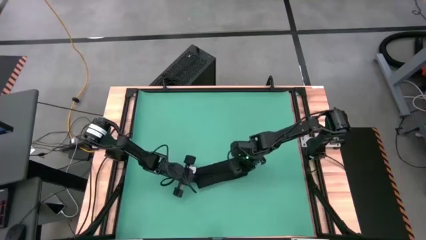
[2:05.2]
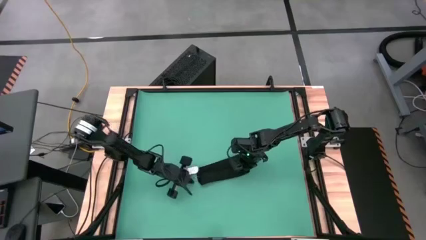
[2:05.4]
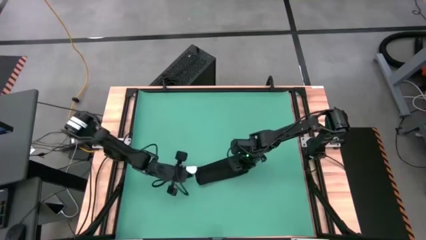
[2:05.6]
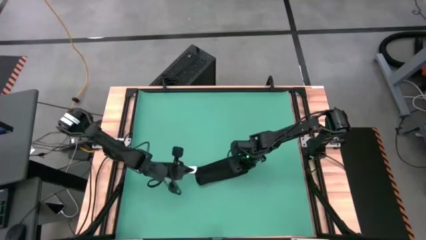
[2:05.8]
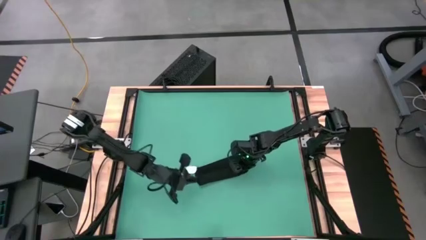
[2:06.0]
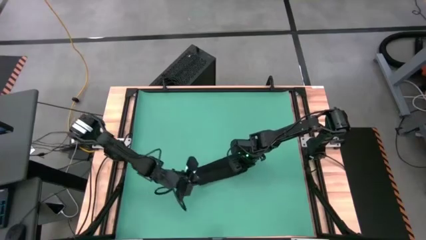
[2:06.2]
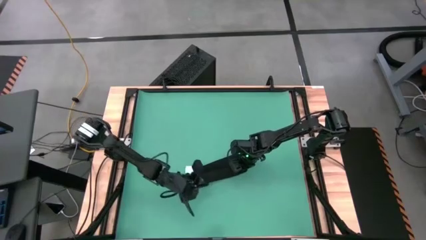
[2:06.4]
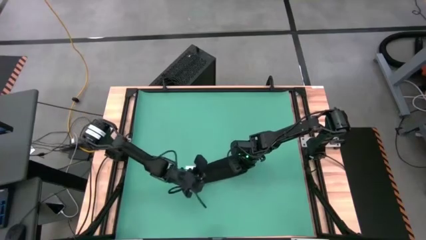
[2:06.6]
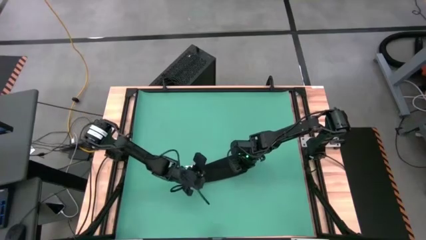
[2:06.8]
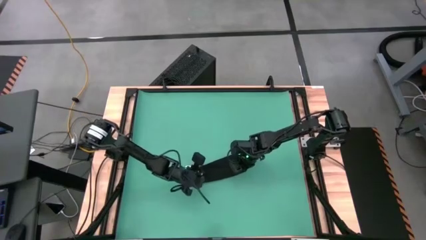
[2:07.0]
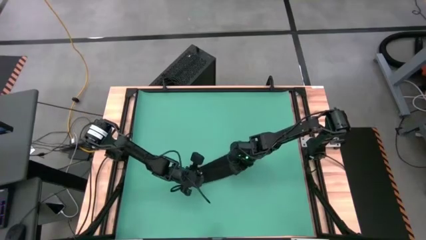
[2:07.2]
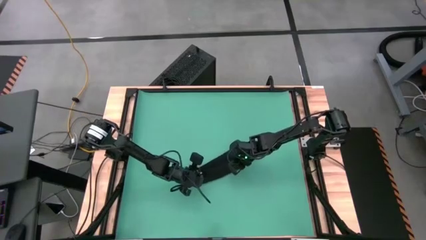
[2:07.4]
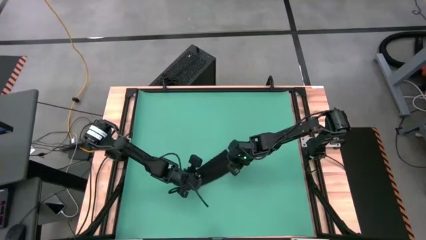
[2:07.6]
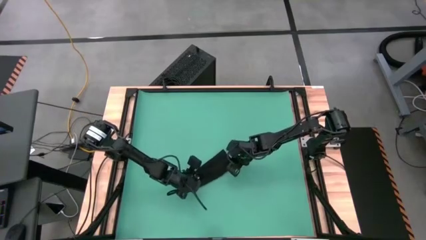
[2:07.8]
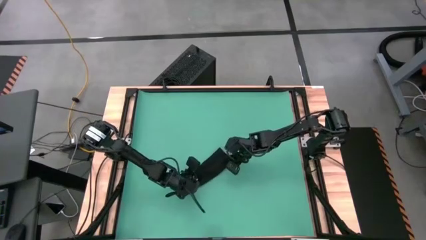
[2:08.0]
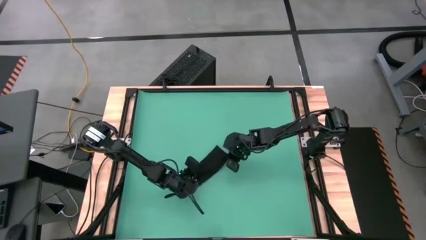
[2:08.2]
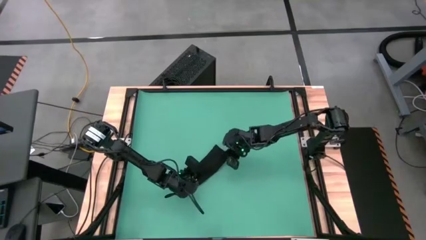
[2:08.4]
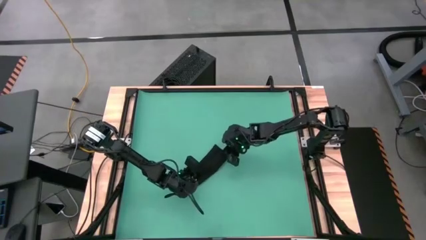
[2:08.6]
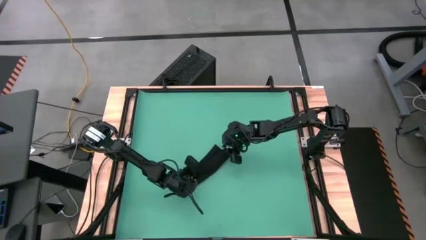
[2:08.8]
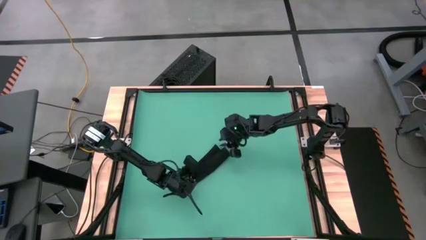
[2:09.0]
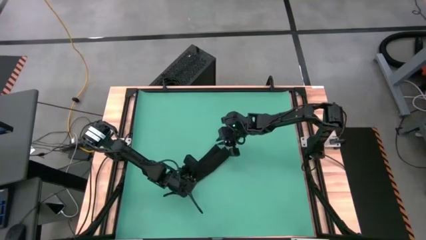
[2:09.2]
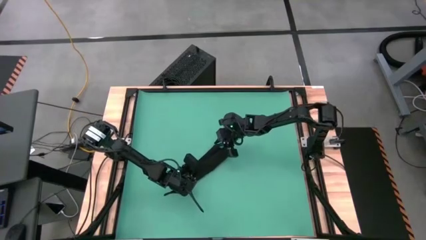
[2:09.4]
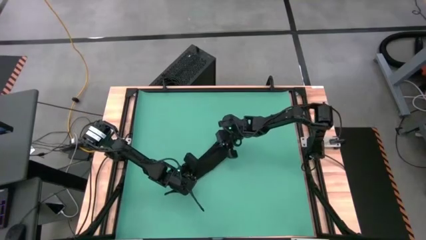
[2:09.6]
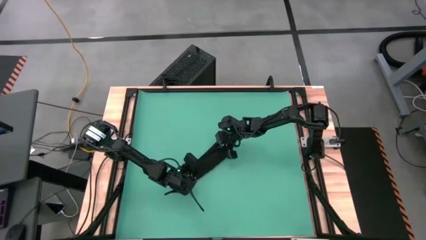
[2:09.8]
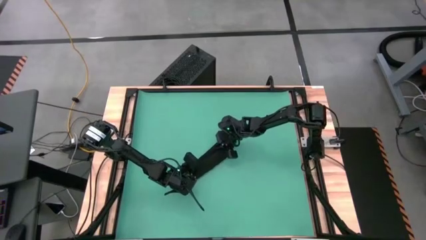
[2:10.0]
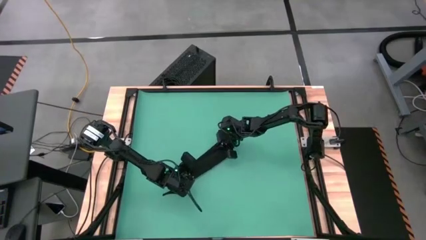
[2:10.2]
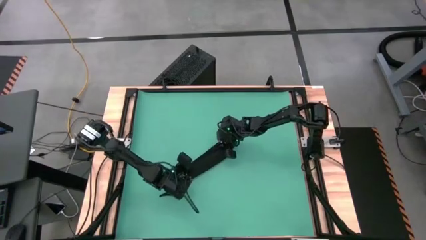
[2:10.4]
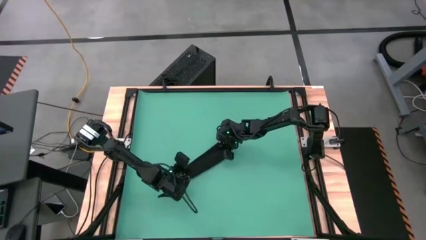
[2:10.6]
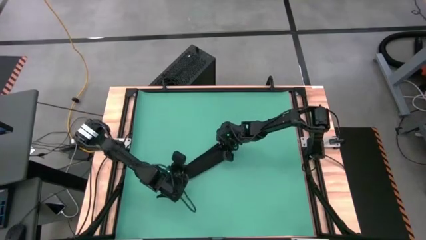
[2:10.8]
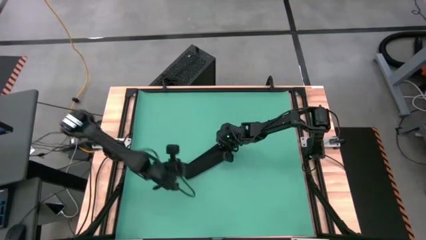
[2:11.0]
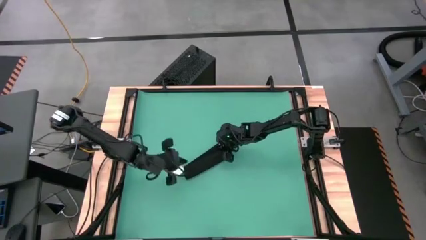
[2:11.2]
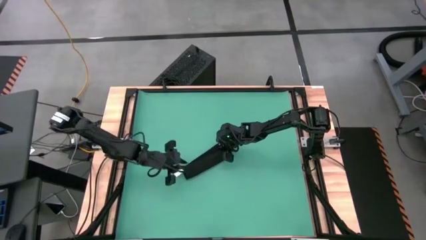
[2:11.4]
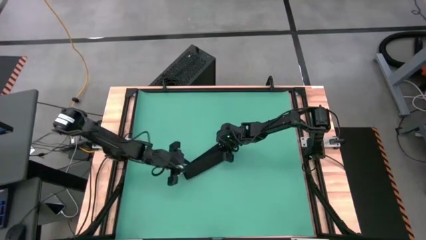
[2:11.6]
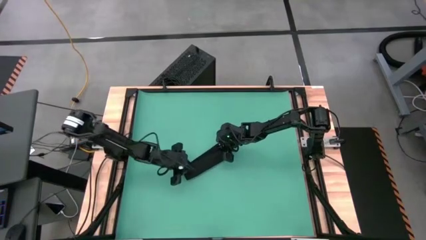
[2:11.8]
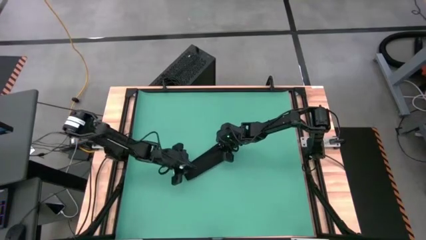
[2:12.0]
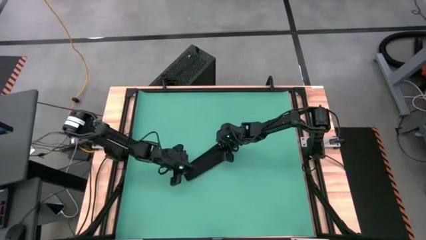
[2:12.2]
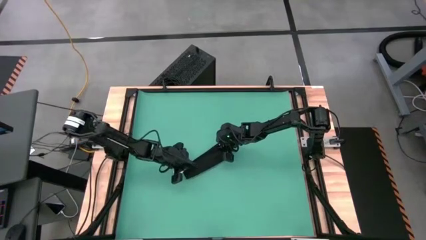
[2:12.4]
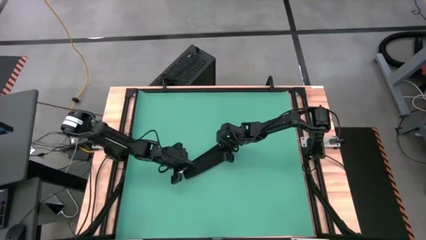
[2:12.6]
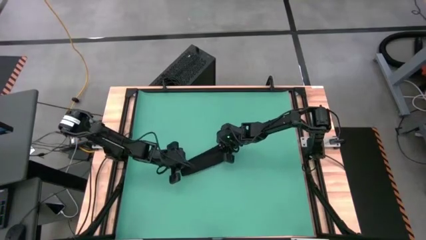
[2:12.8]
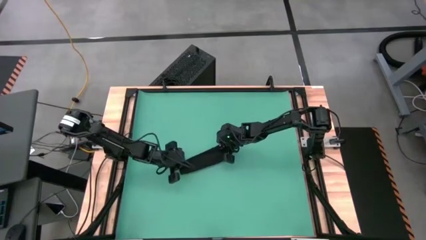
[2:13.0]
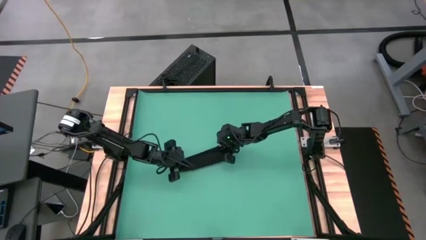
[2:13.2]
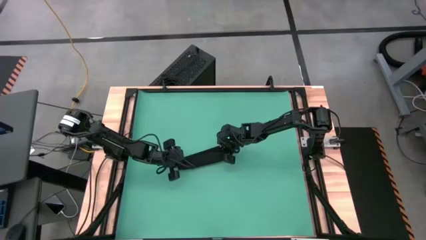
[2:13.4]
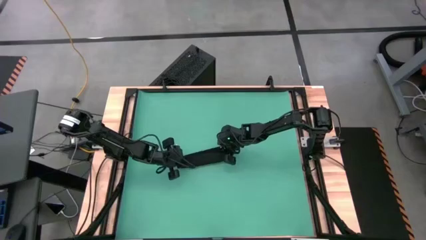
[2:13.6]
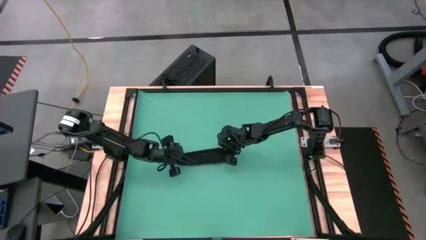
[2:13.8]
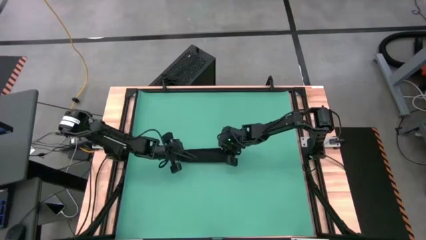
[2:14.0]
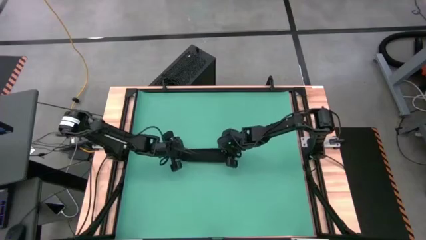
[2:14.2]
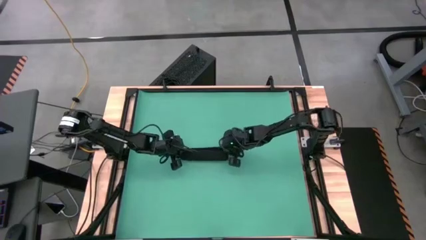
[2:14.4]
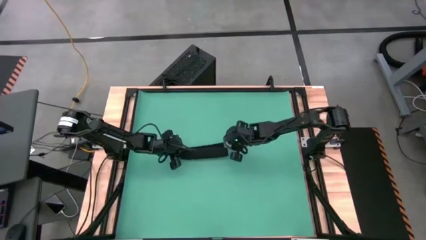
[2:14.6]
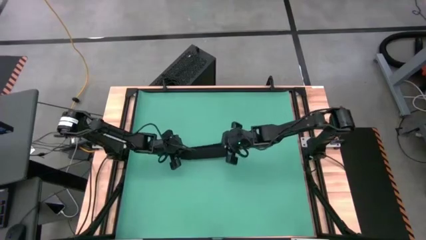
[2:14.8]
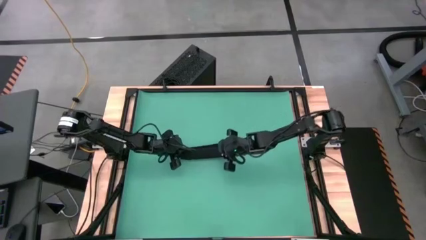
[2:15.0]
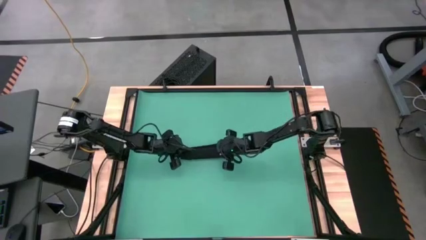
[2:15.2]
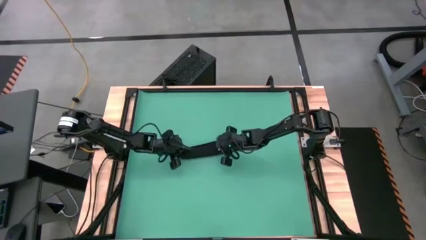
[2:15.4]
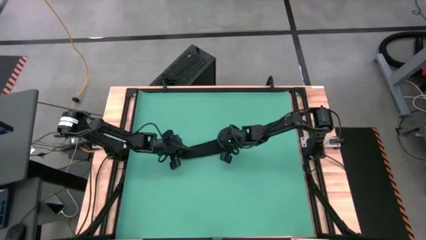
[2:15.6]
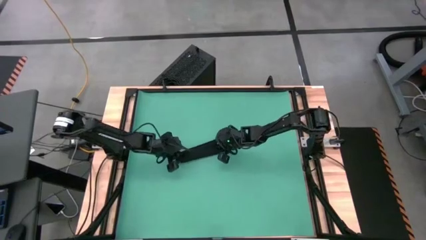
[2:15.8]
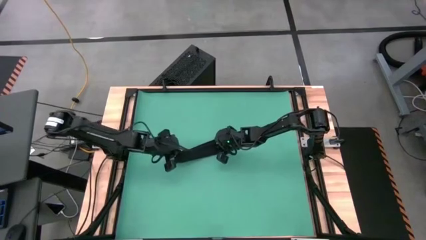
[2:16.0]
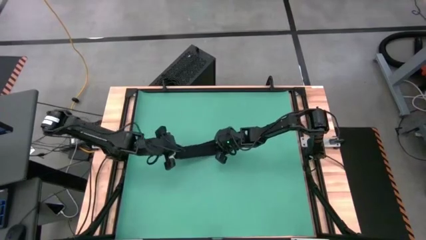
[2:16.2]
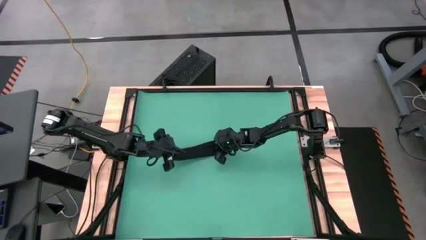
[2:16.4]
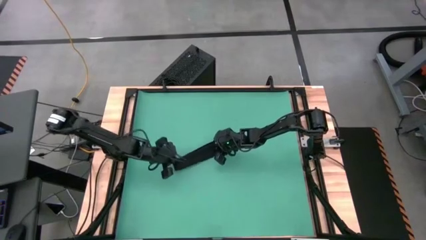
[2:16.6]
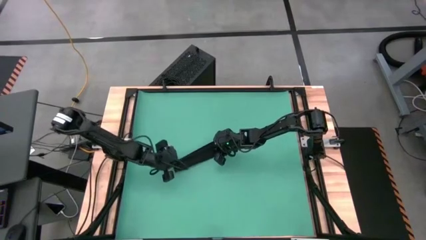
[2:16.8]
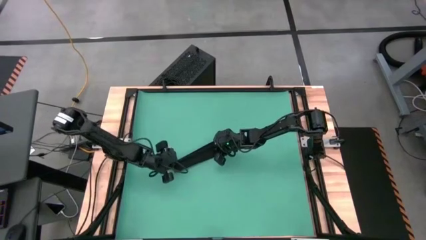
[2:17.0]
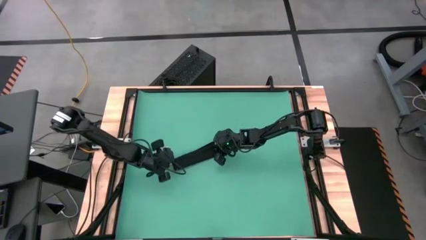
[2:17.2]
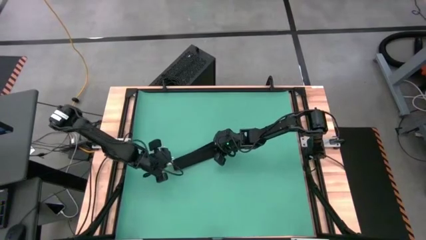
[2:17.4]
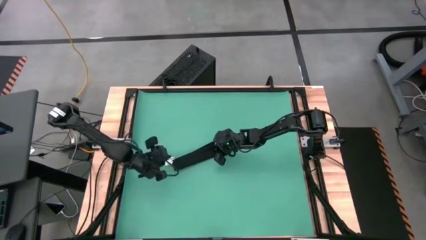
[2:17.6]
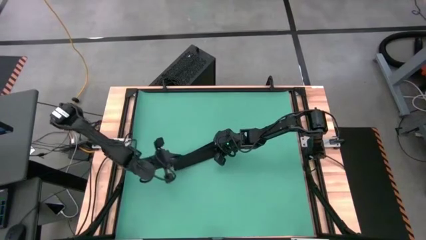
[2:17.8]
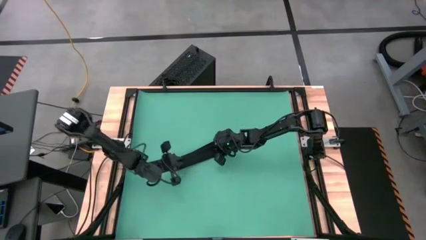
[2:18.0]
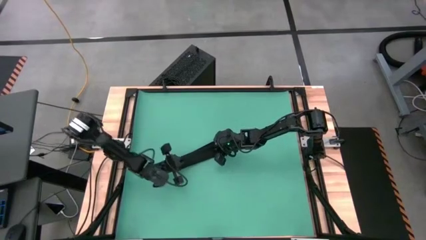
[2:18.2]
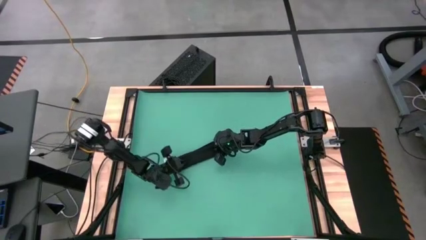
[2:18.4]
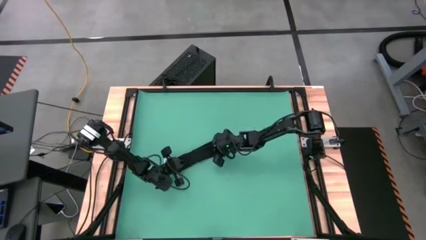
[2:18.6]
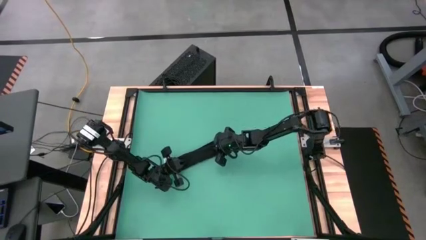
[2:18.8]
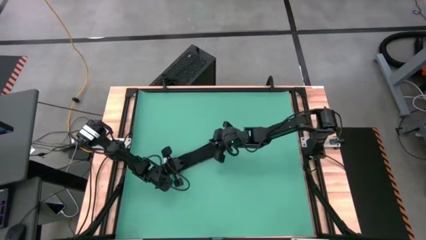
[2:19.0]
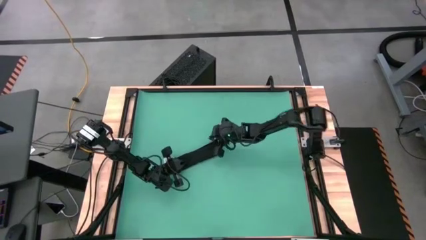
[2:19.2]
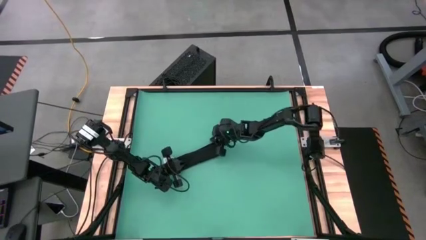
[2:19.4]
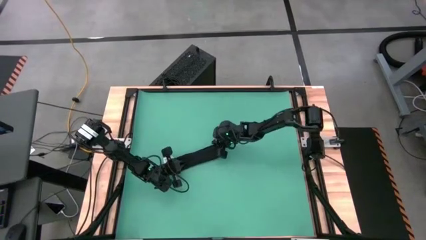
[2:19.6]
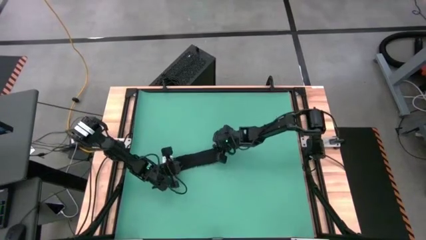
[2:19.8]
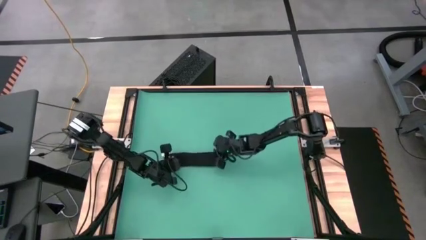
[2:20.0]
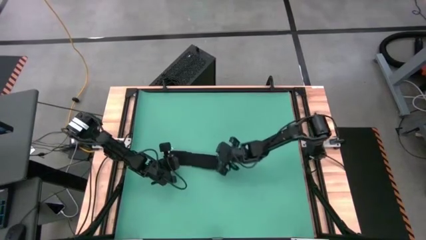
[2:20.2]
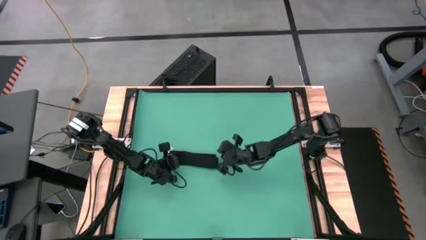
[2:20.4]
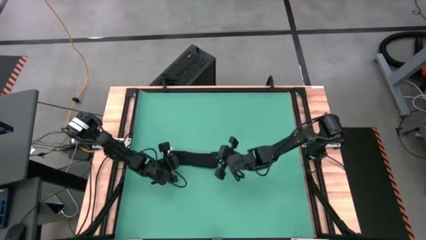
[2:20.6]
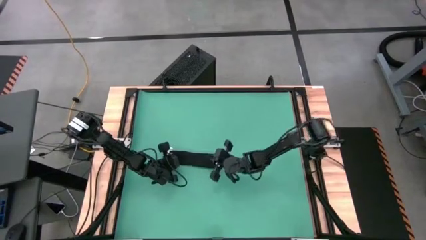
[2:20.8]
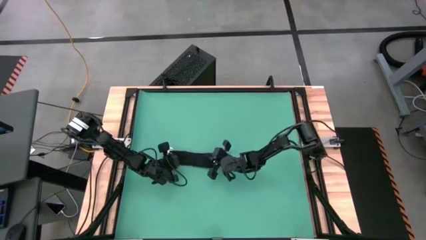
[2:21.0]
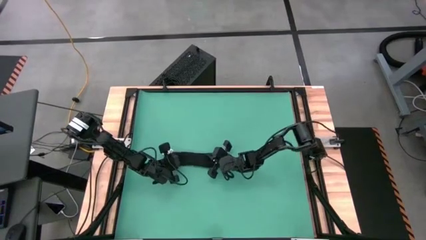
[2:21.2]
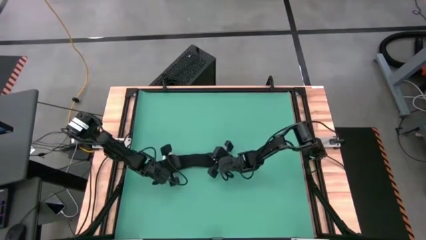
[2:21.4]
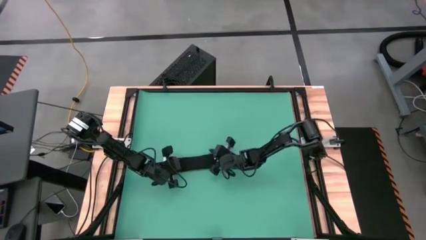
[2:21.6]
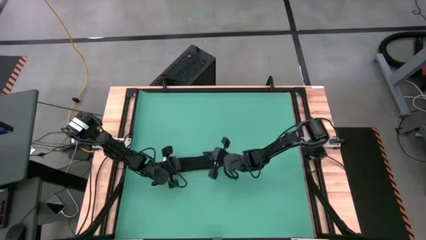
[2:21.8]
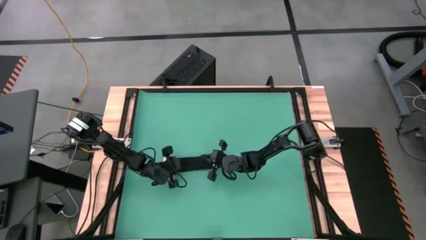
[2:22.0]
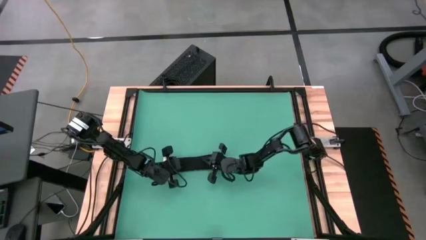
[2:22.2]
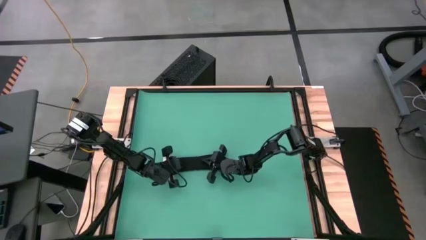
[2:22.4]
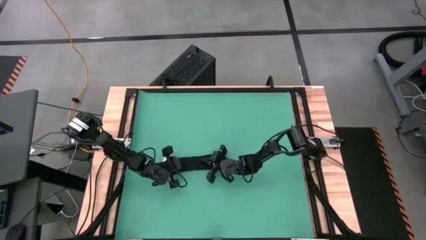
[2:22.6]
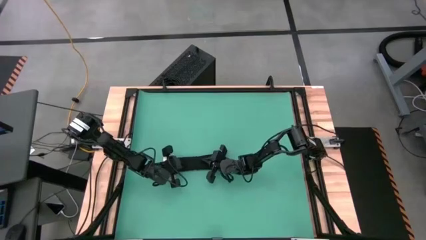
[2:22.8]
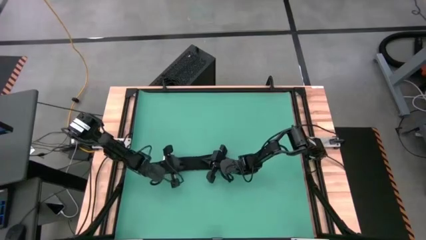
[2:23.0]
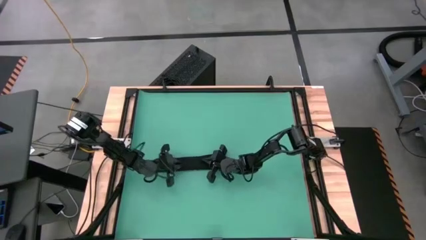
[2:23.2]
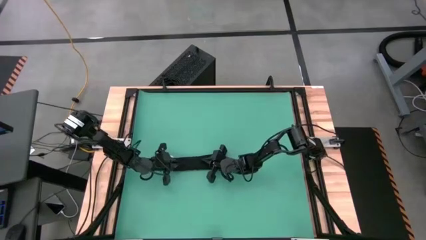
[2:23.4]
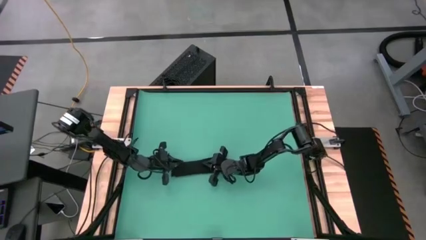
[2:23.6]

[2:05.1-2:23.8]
Task: Roll towel into tight, uniform cylinder
Roll the towel
